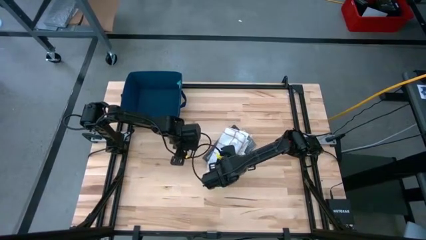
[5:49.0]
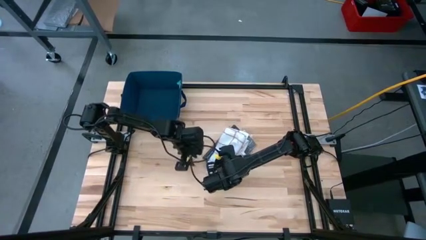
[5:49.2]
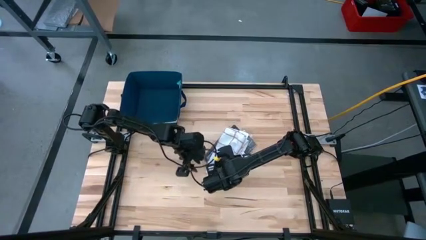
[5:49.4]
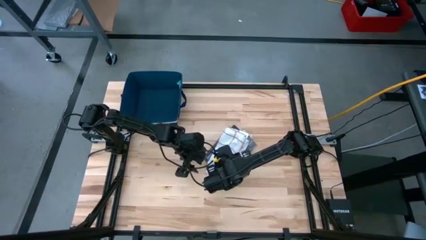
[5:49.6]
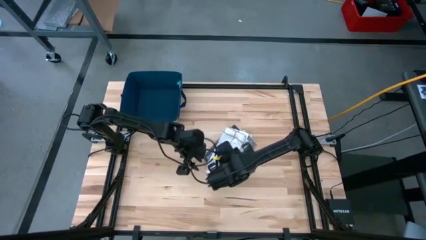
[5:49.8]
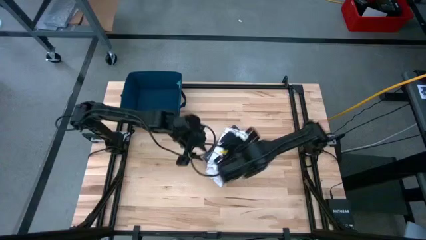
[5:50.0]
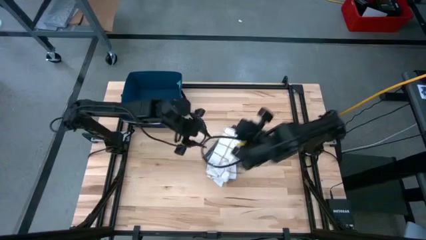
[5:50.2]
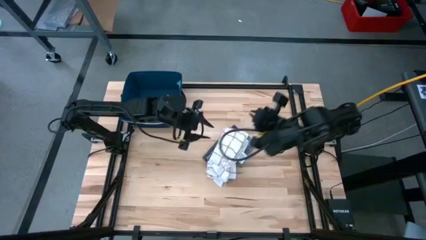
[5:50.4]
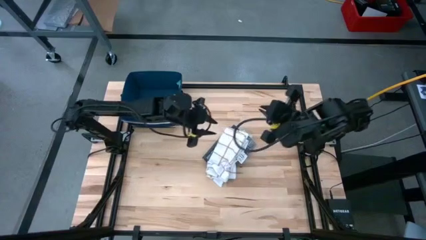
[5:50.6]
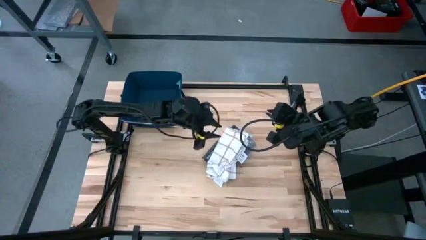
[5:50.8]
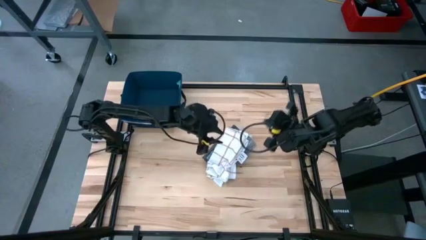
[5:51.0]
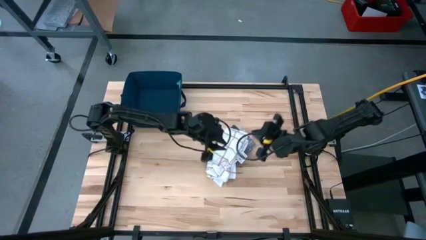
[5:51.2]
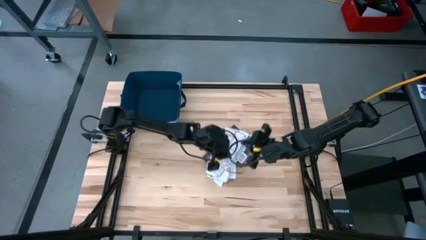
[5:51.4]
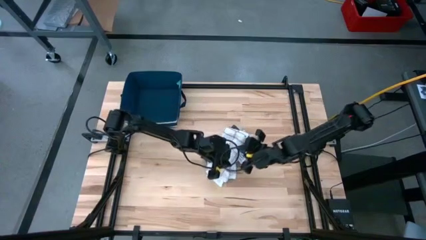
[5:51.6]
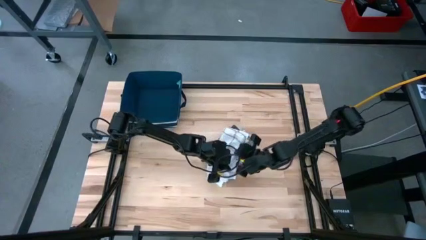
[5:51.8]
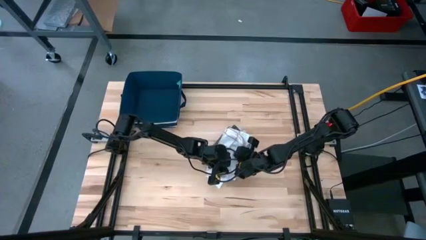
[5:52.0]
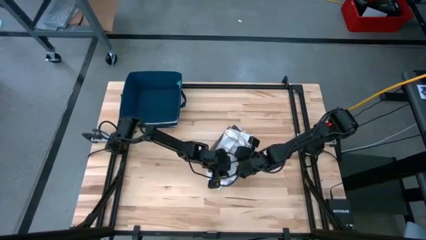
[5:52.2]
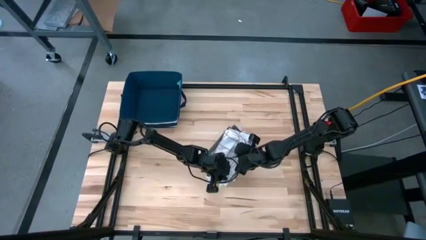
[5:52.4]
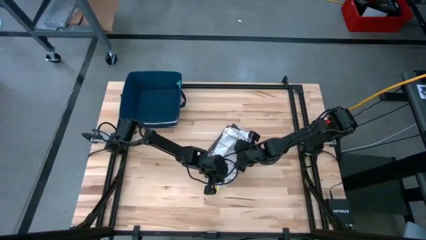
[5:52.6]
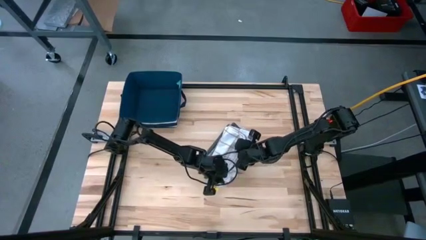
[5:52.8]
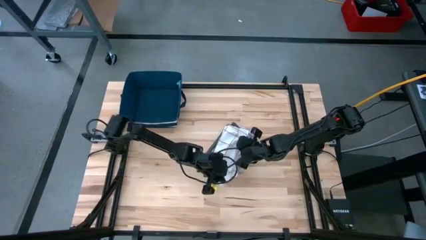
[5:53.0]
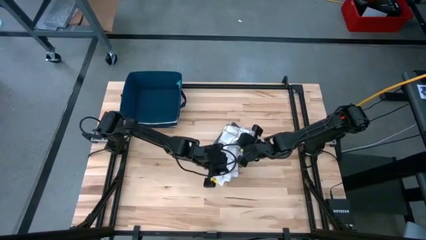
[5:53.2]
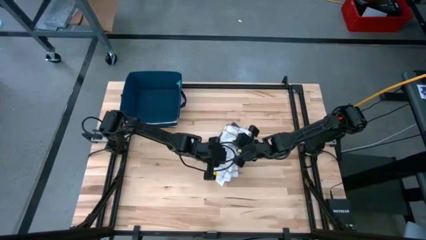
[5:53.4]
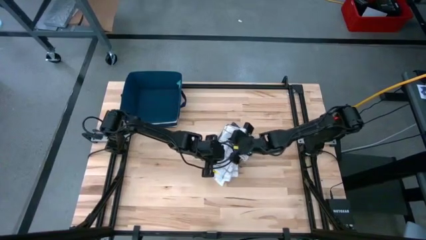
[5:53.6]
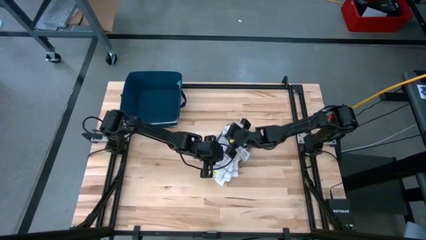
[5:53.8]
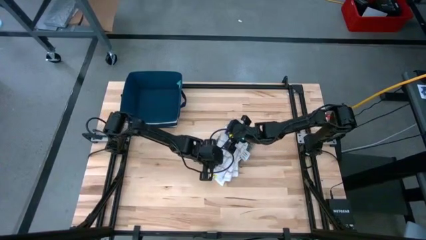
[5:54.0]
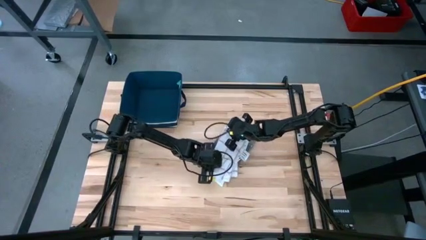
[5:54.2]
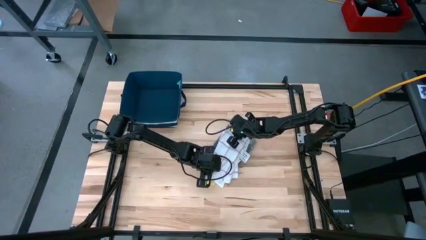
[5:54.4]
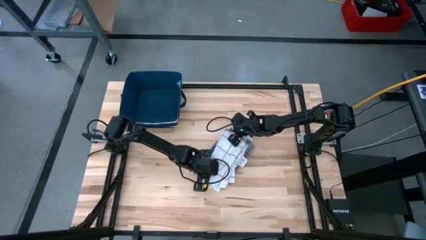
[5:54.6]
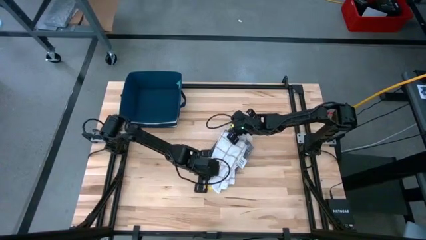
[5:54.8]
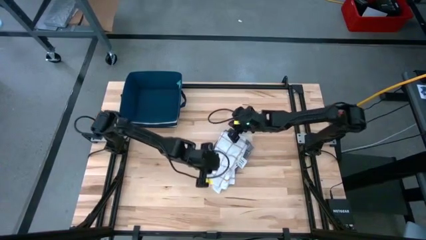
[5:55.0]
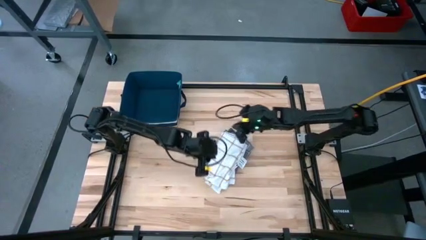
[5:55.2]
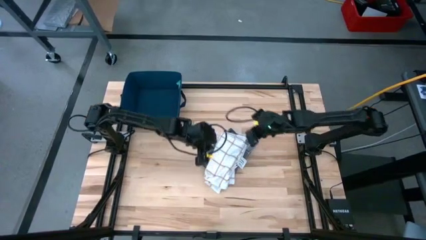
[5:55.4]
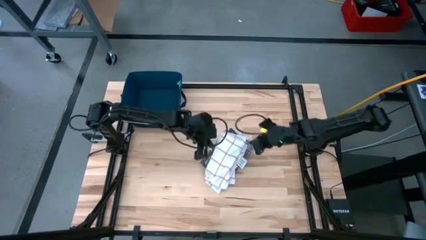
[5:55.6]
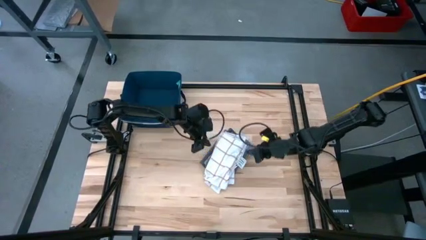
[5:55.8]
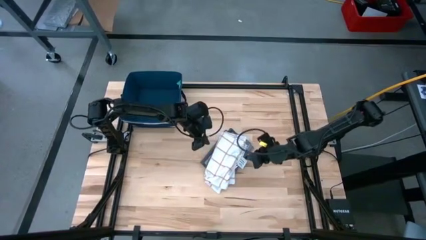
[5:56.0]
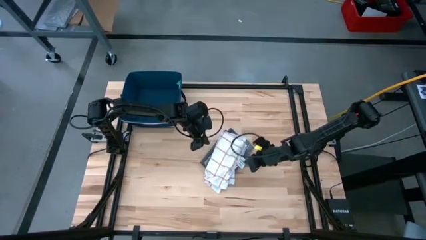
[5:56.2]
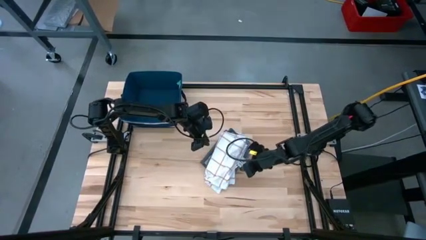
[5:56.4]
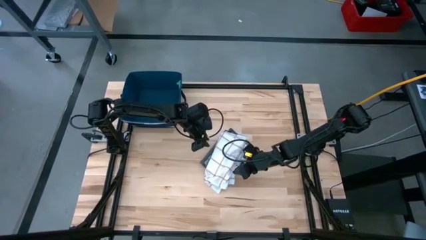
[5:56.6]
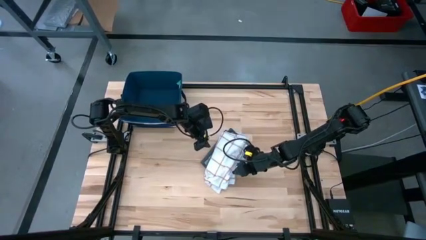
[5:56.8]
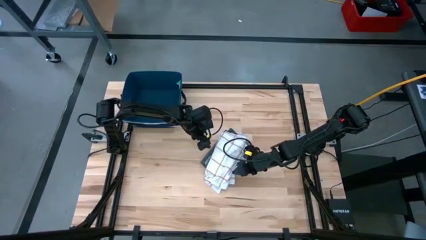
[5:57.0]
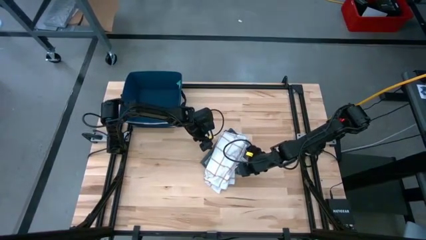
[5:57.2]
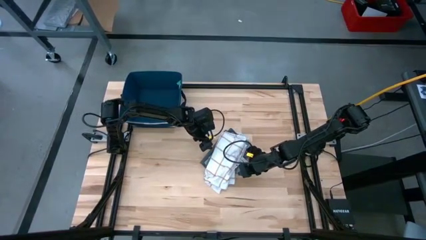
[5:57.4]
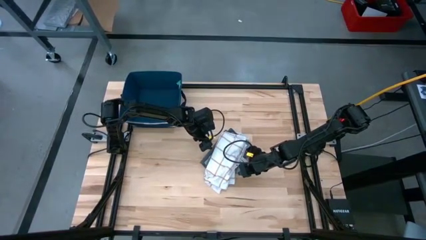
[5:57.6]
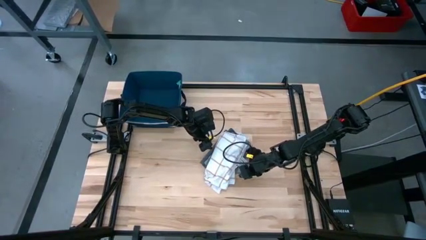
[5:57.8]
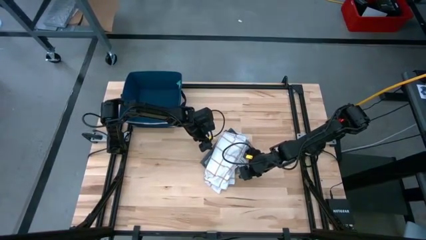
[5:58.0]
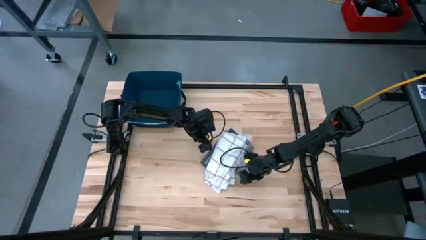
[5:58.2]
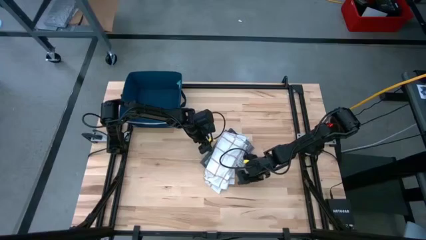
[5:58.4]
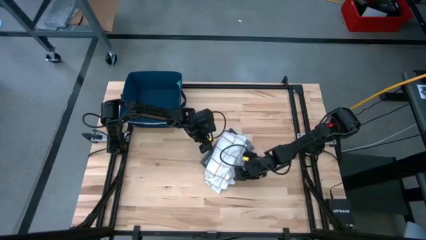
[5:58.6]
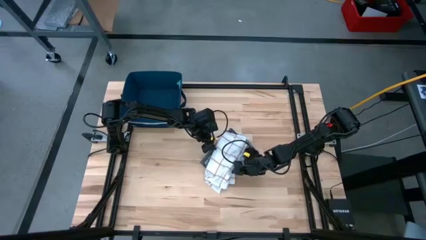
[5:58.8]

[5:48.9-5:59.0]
Task: Fold towel
Put the stacked towels into the blue bin

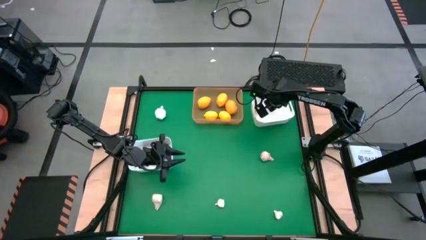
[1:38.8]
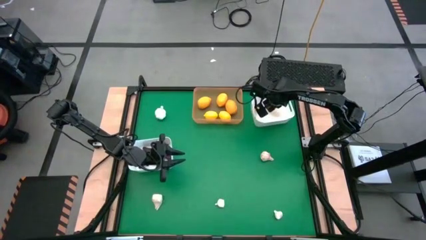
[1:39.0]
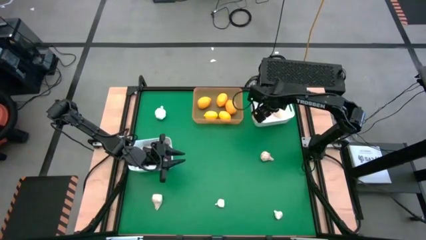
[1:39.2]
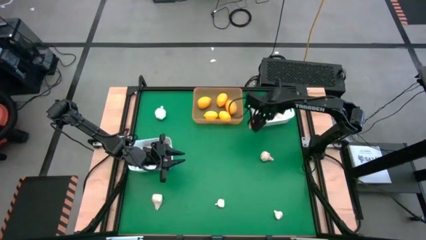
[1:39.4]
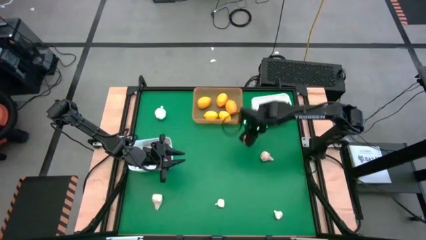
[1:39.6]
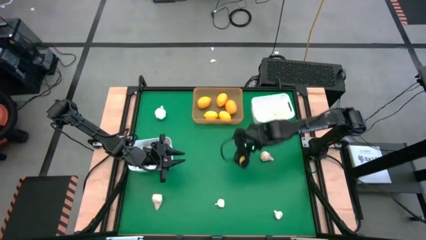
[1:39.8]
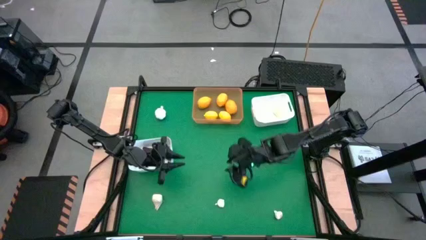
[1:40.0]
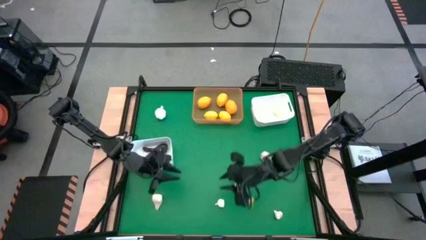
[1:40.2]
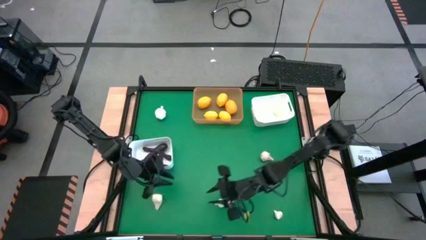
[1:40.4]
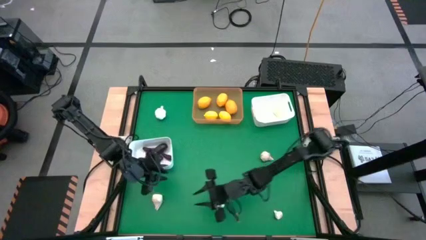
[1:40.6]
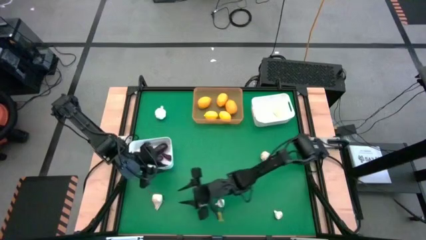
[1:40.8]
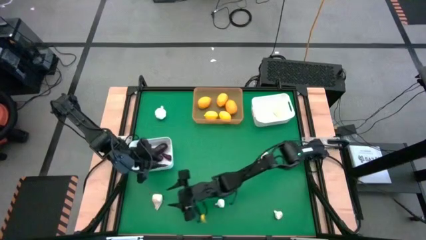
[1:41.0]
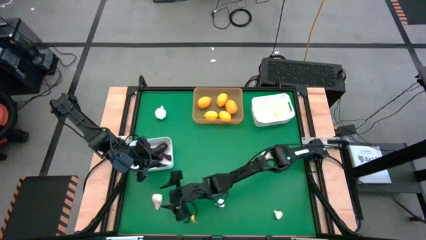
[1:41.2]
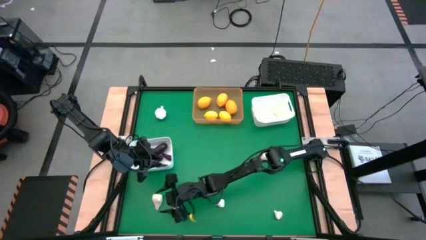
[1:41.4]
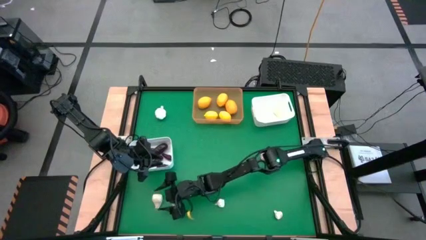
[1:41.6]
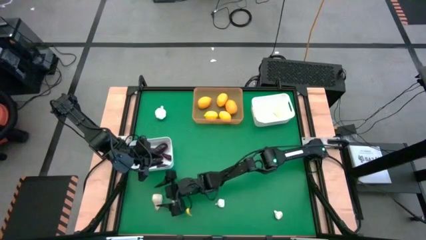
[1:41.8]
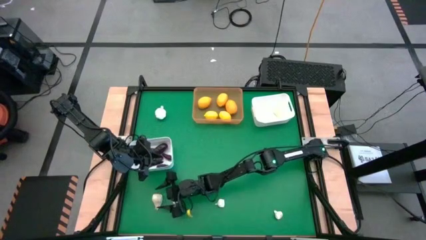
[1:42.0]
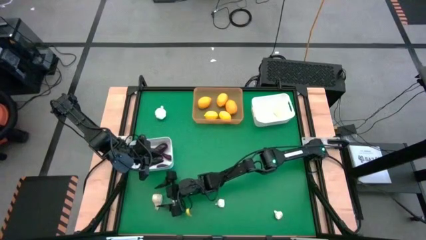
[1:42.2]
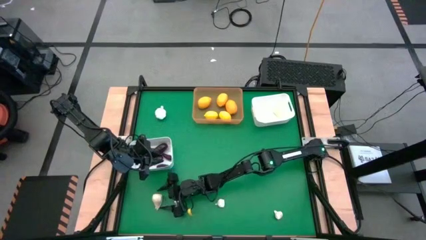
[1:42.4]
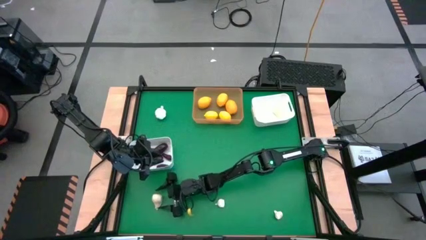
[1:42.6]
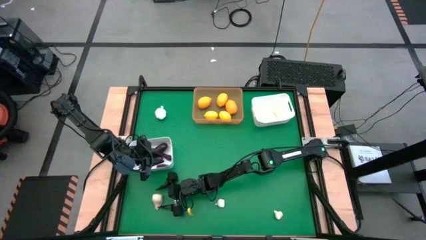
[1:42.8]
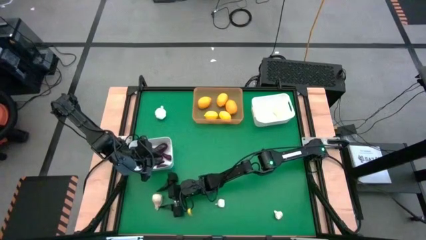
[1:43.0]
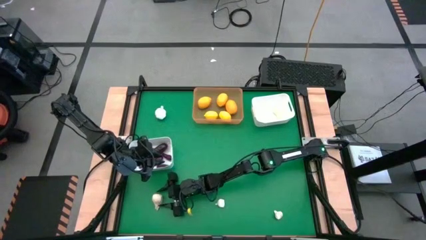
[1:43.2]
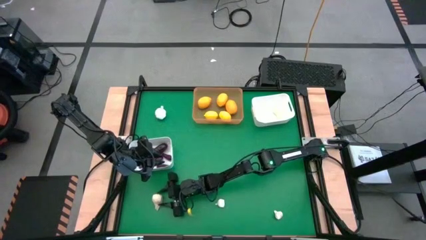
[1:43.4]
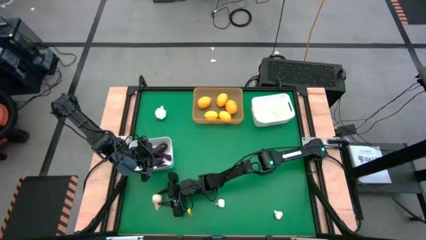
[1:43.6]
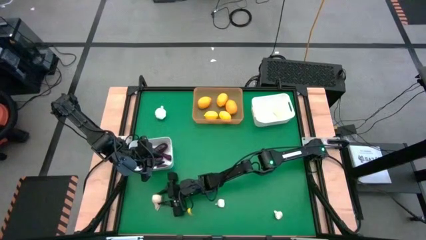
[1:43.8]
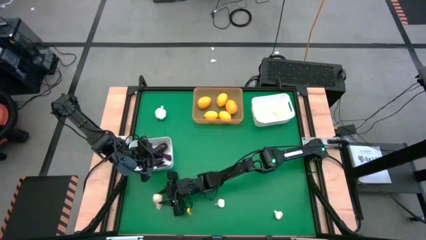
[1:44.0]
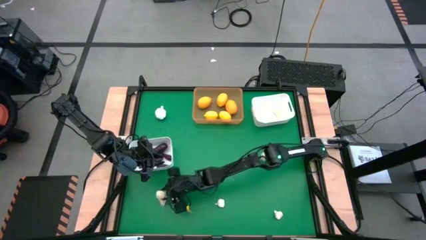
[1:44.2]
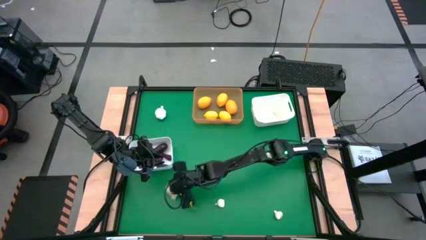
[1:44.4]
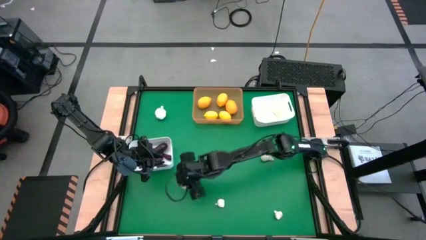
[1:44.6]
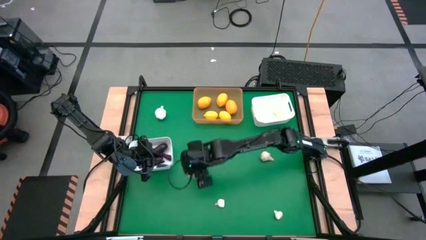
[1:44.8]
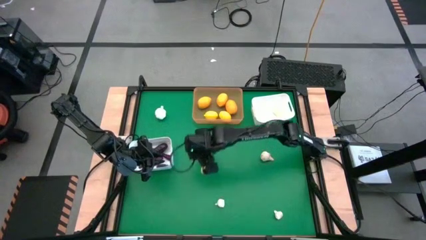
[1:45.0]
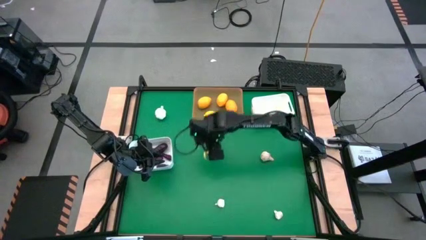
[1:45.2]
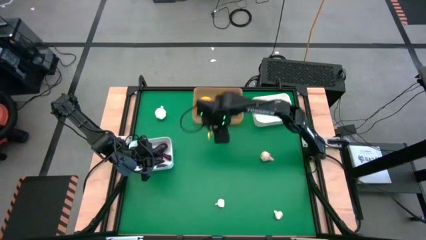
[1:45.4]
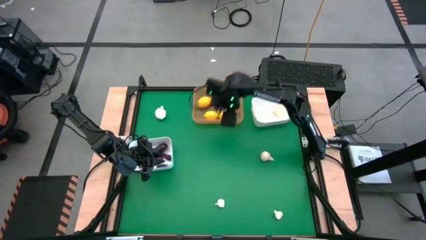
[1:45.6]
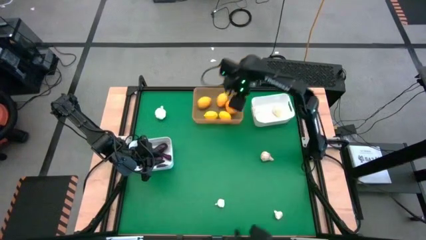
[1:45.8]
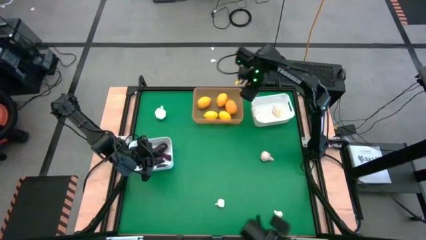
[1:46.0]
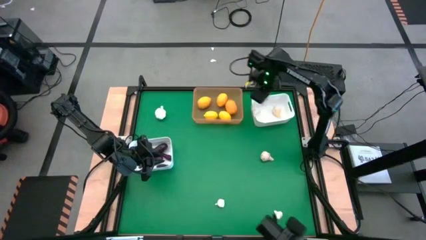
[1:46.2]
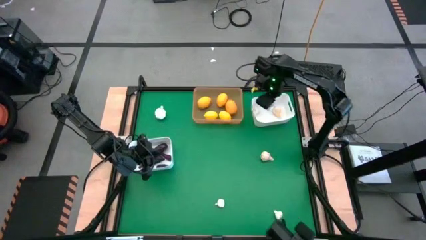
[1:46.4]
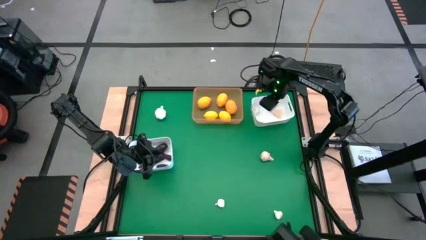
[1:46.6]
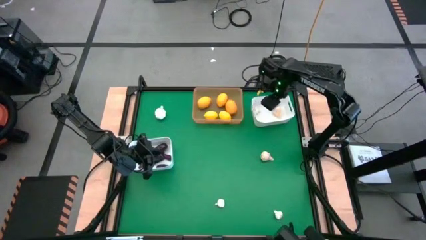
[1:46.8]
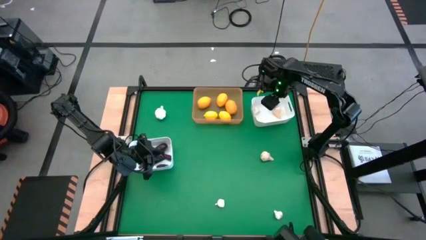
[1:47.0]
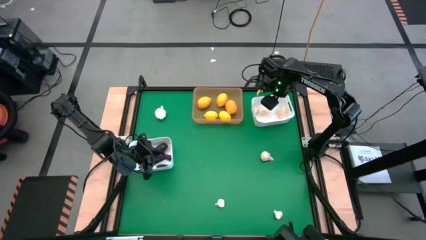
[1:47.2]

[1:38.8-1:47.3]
Task: Sort produce into baskets
Put the garlic into the right white bin
